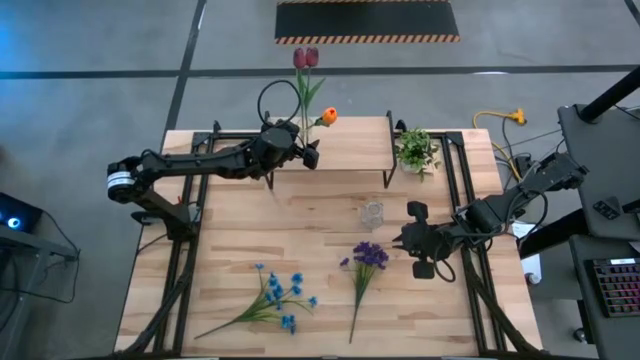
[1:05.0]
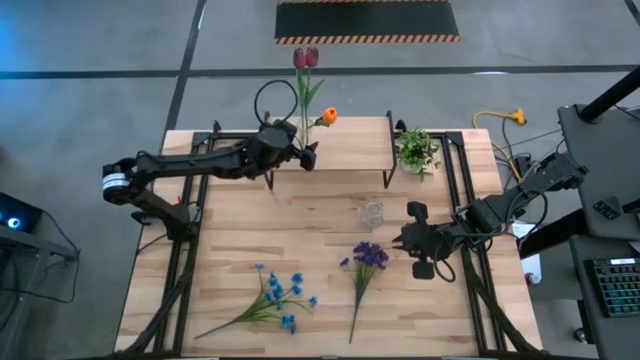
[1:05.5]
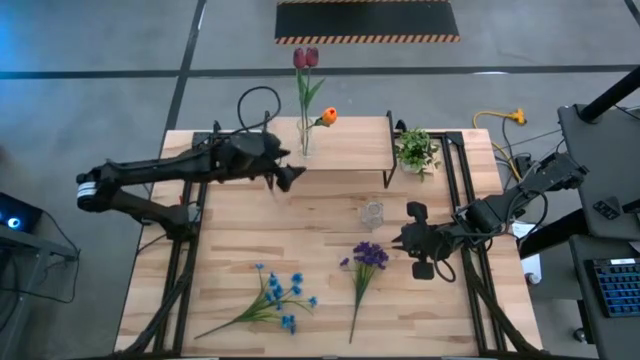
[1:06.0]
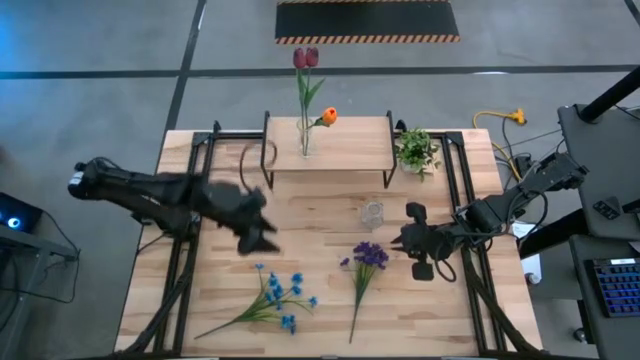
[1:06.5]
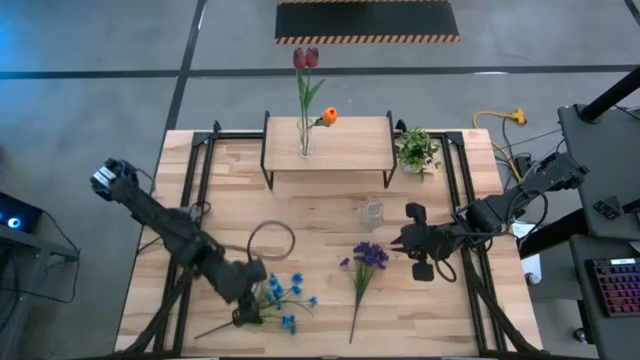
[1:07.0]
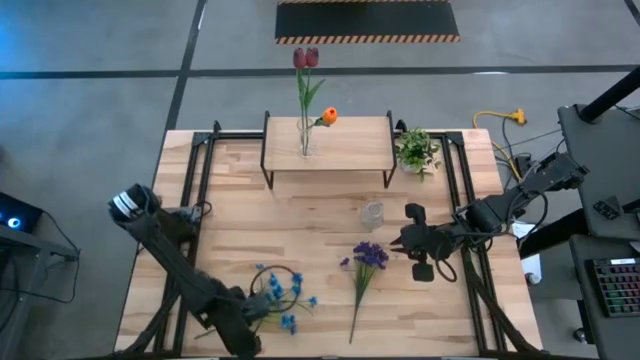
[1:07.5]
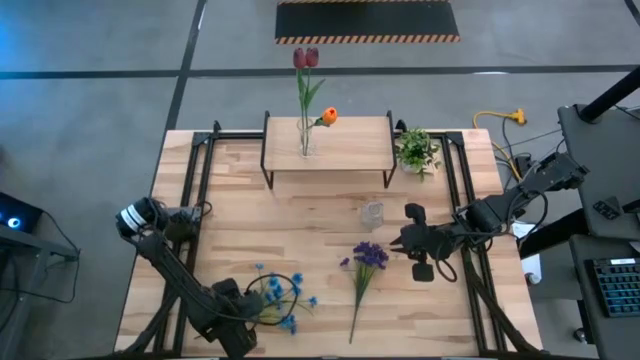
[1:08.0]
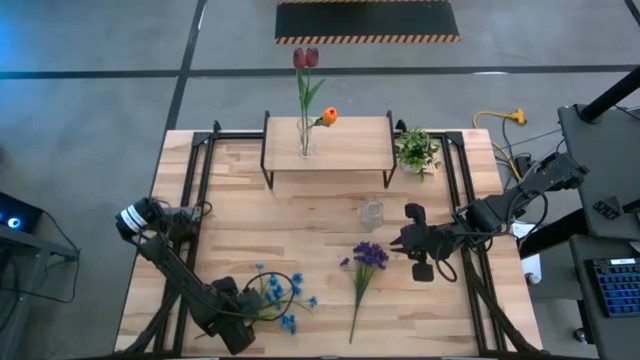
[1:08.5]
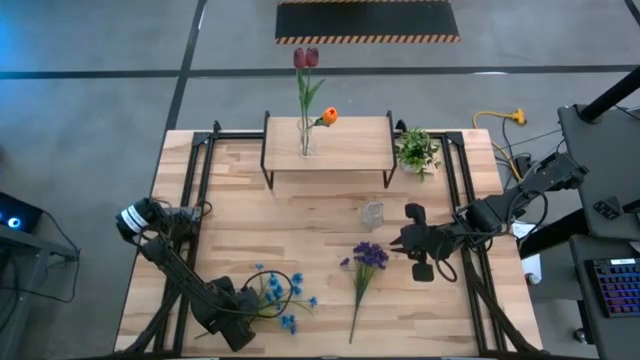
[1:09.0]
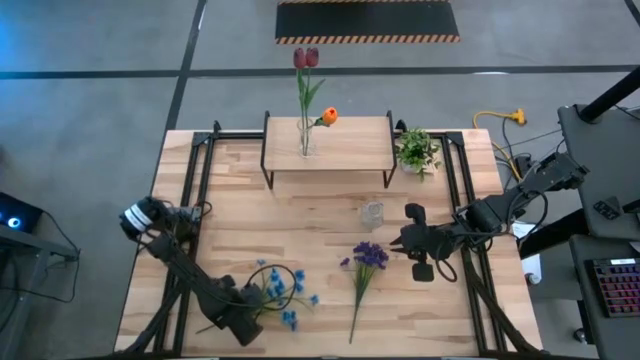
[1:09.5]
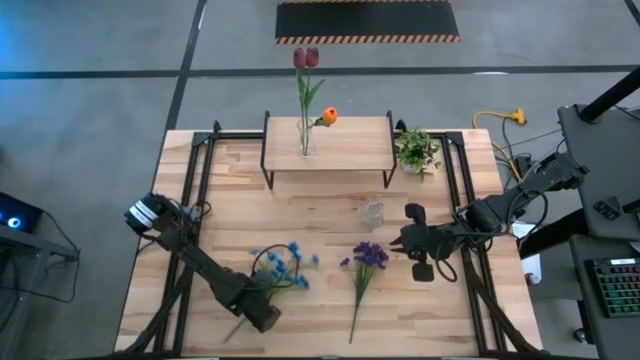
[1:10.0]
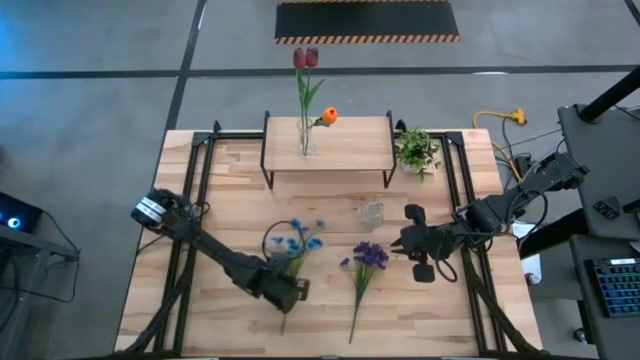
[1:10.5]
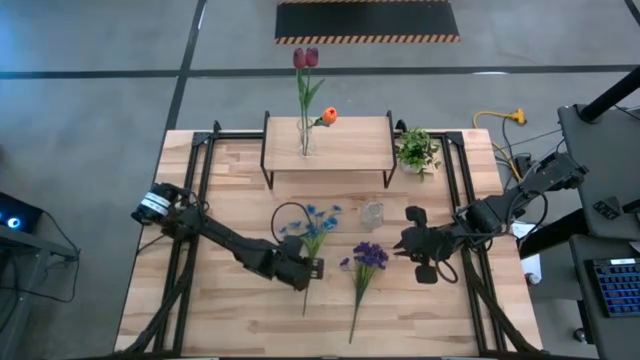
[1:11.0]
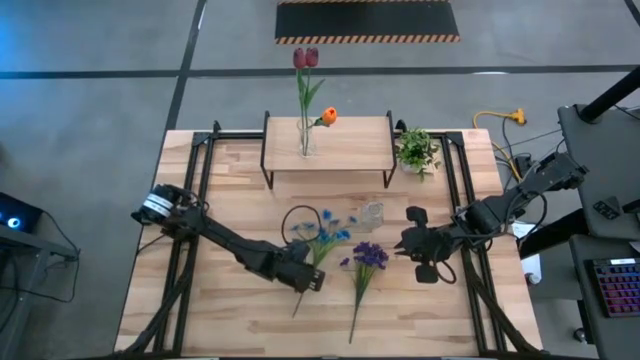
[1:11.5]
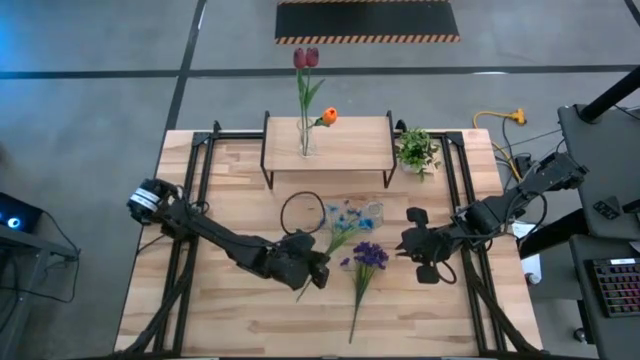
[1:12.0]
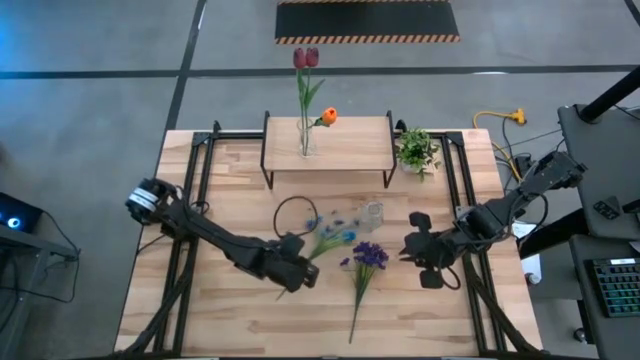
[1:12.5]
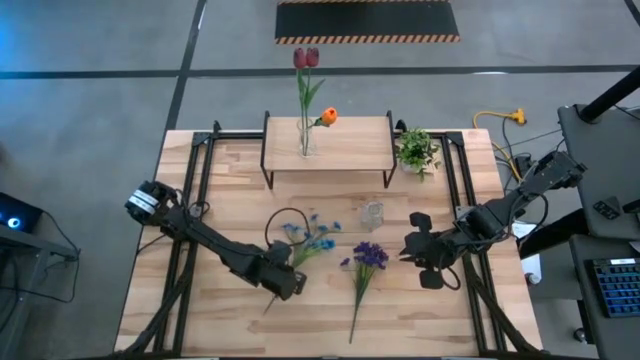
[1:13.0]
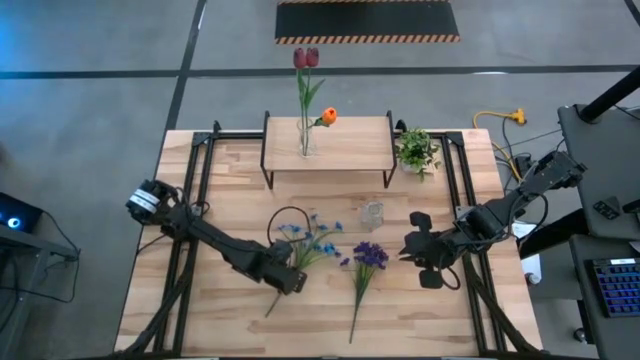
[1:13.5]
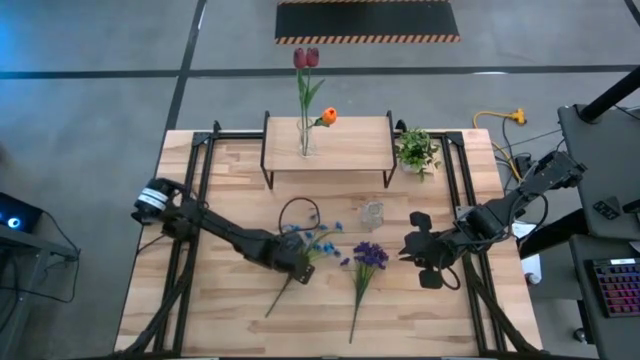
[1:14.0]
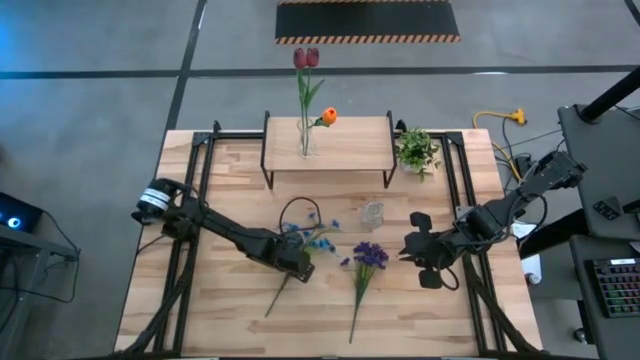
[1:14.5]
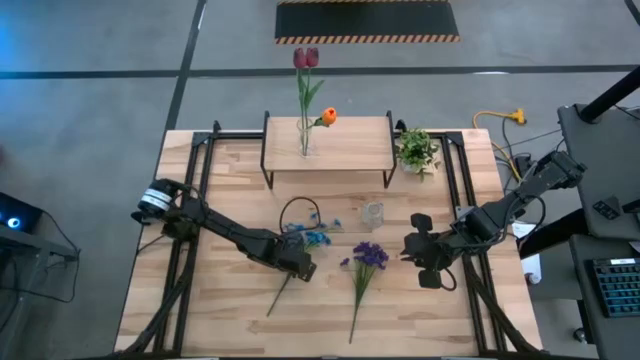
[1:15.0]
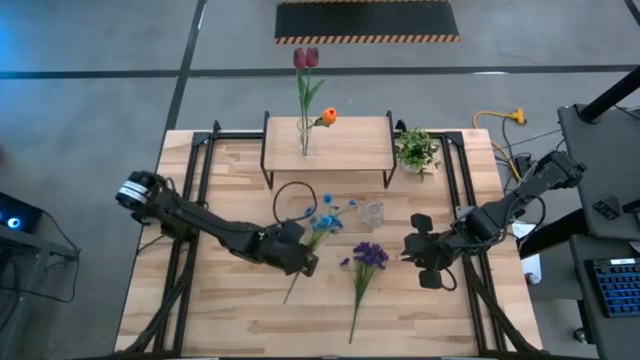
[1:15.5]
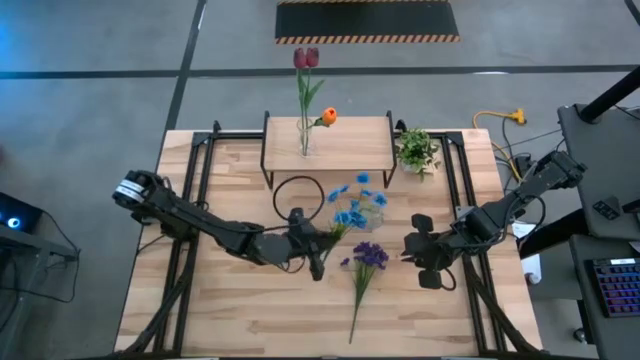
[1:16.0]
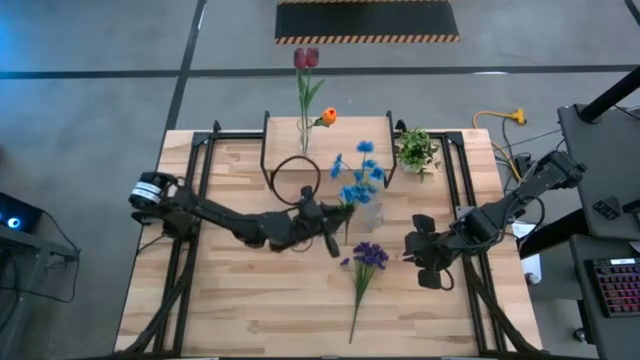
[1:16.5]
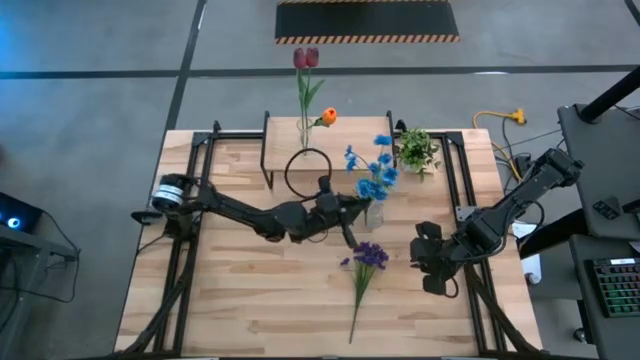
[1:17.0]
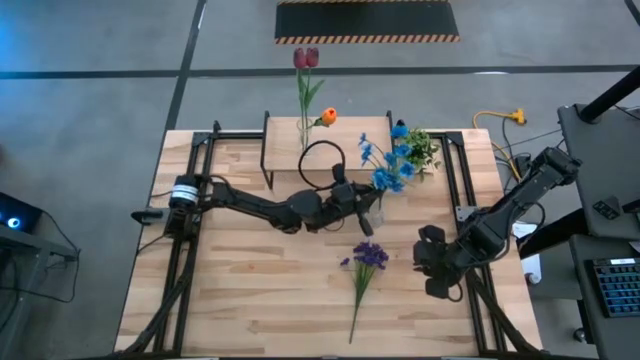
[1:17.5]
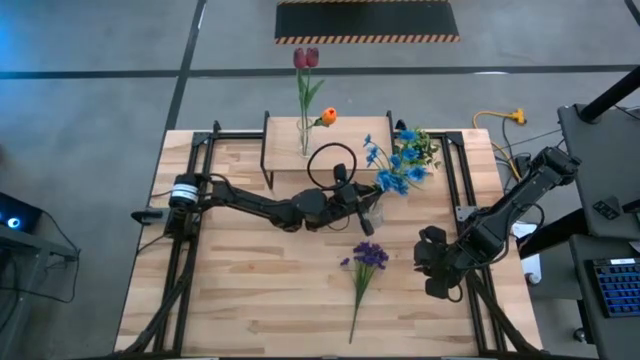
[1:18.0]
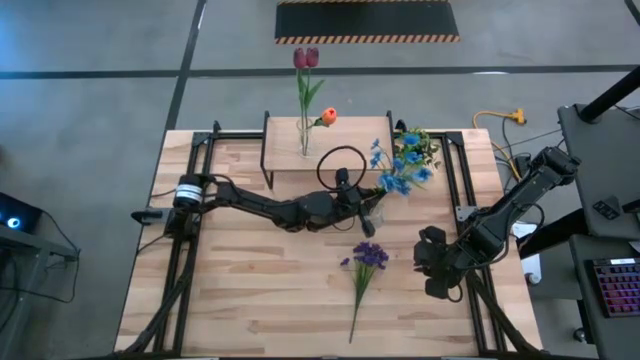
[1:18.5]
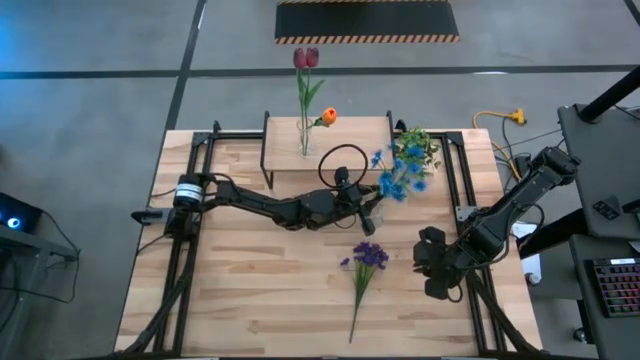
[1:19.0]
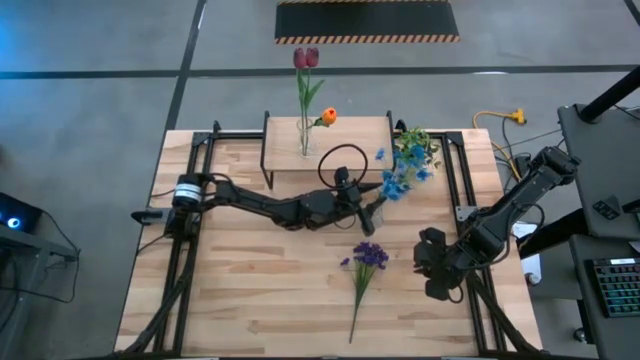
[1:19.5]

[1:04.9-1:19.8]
Task: Pick and place flowers into a vace then onto a shelf
Put the blue flowers into the transparent vase

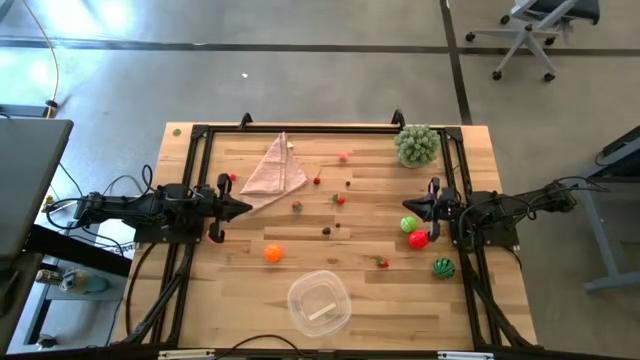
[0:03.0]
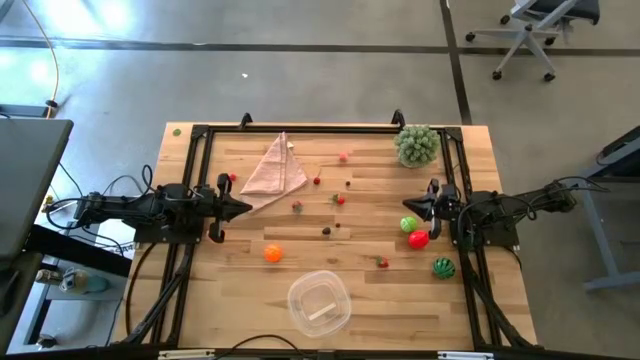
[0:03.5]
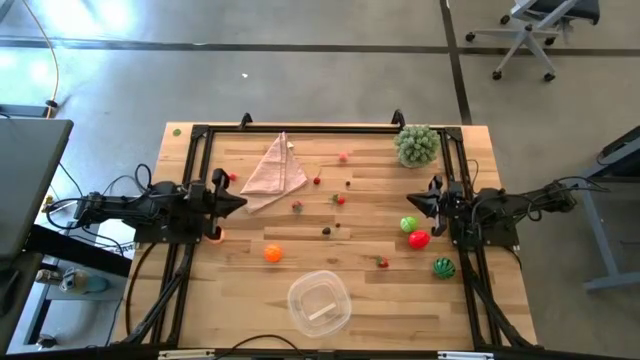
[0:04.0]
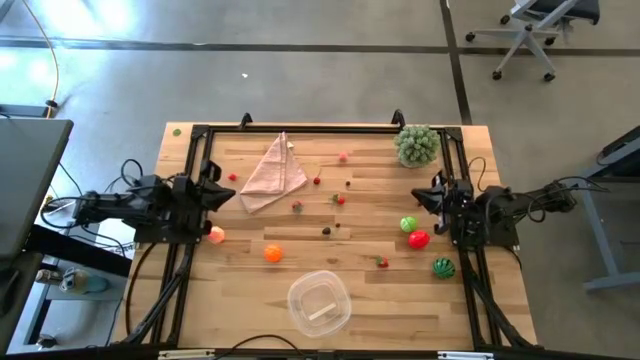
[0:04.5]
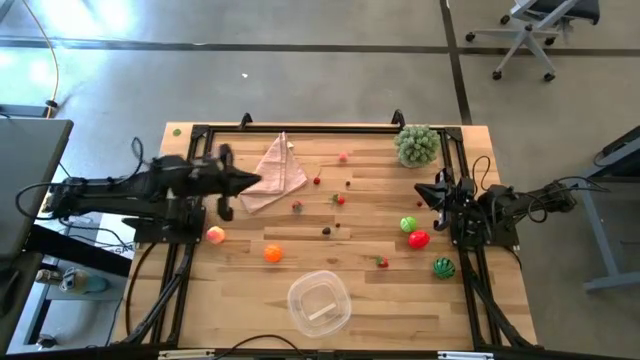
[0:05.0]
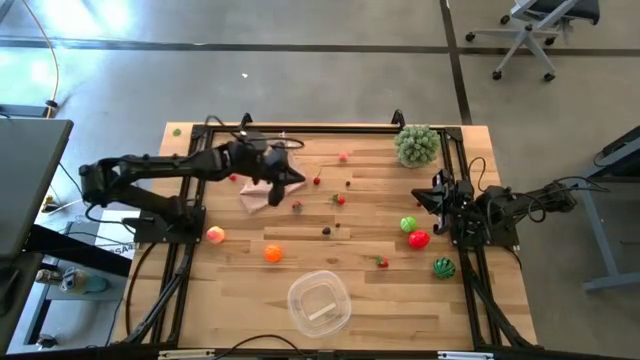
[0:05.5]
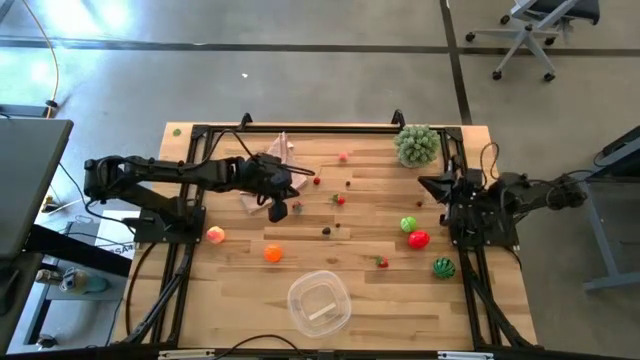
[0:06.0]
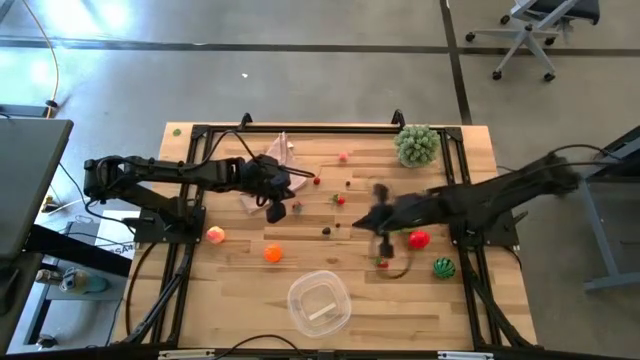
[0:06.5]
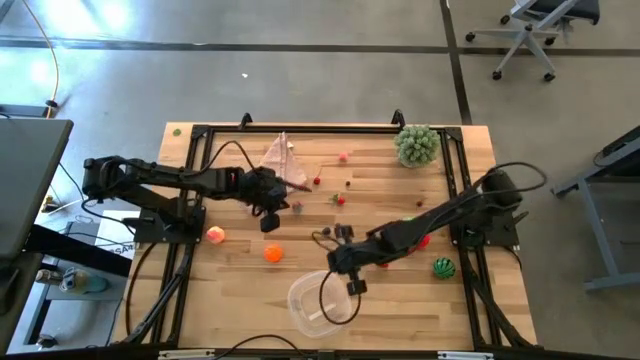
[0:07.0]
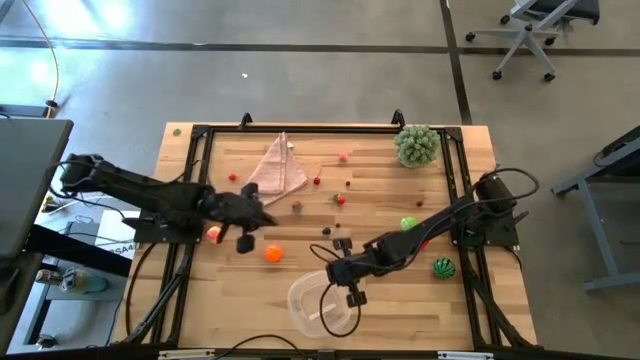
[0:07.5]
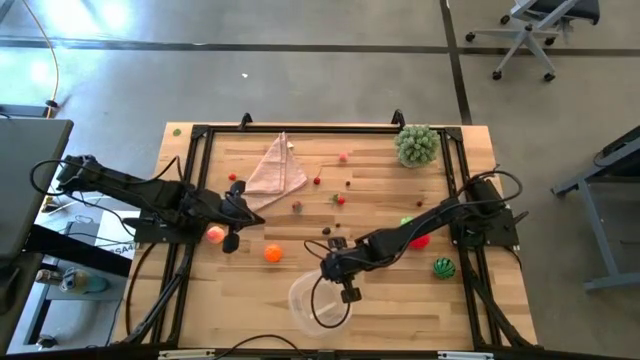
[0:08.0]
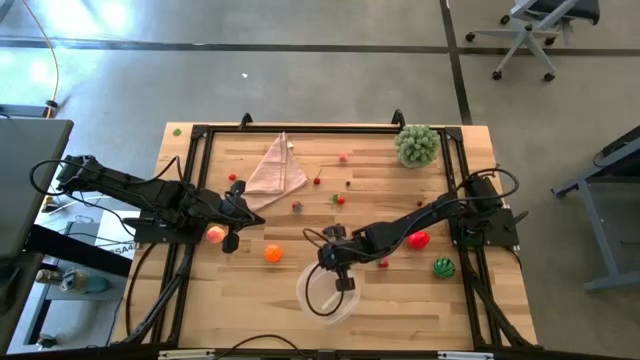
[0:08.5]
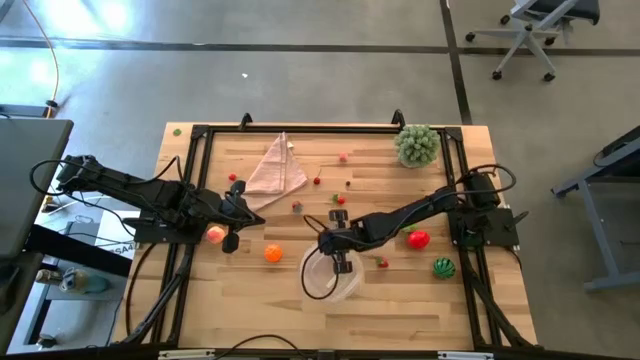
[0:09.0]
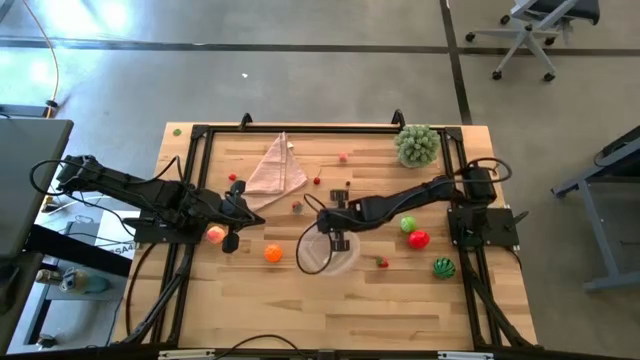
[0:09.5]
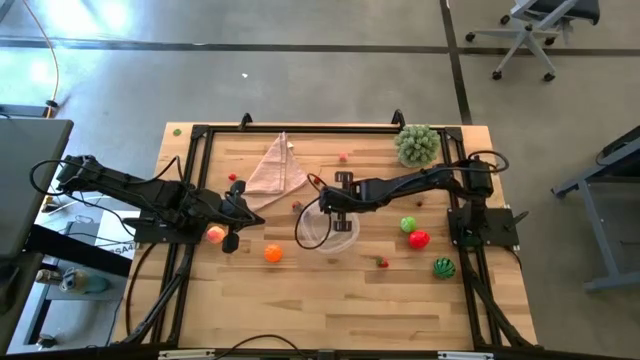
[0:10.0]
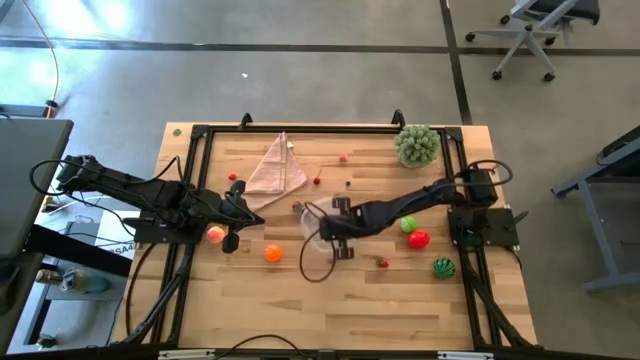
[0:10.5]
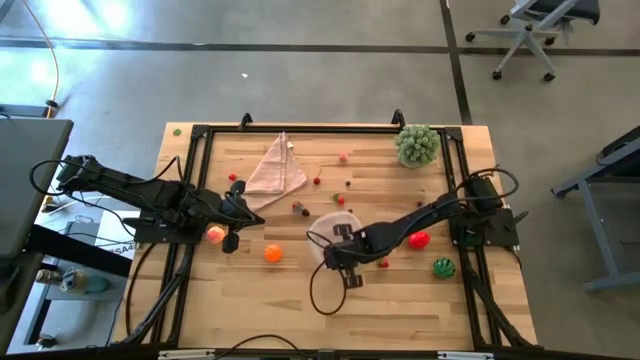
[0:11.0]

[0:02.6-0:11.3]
Task: Pick and placing Produce into tupperware
Move the transparent bin on the center
